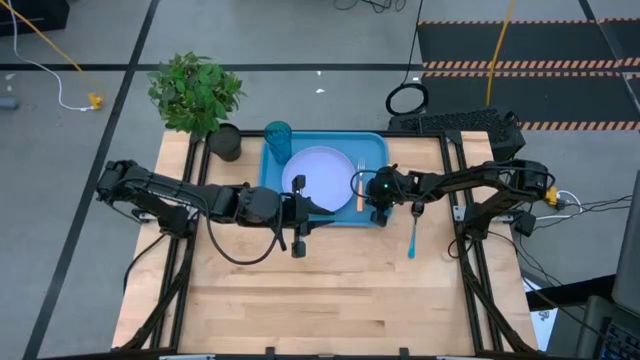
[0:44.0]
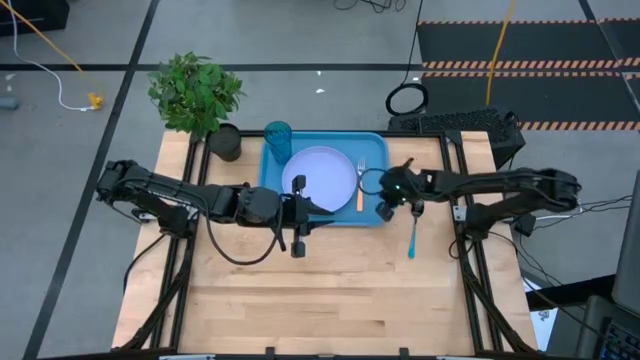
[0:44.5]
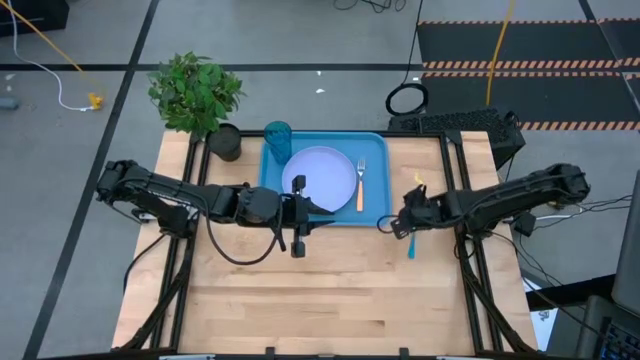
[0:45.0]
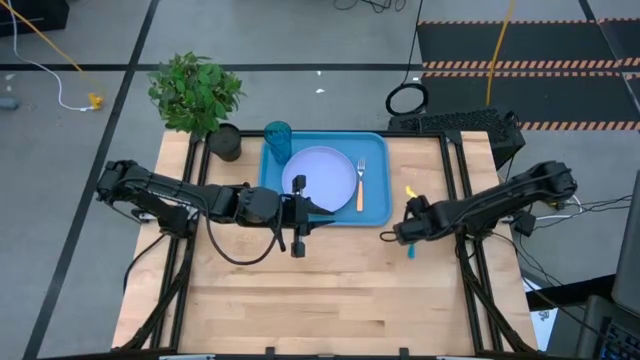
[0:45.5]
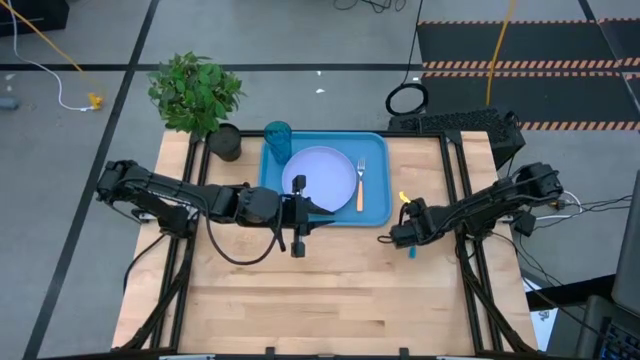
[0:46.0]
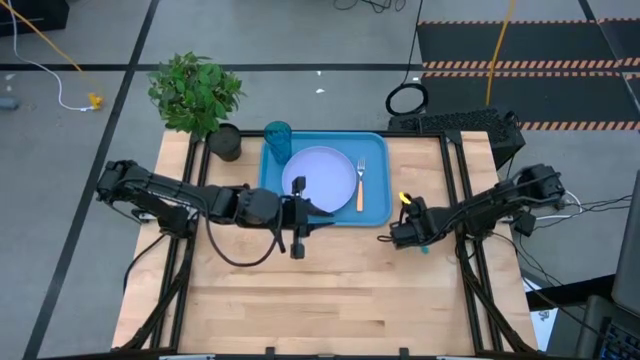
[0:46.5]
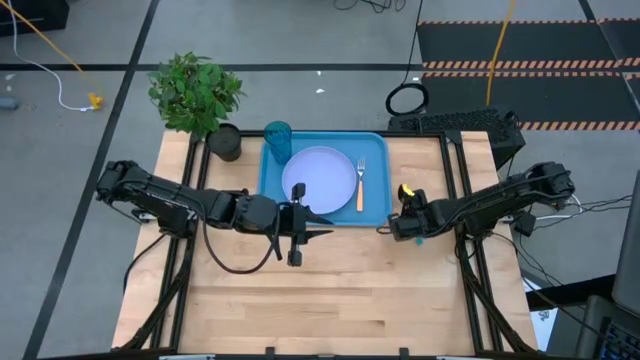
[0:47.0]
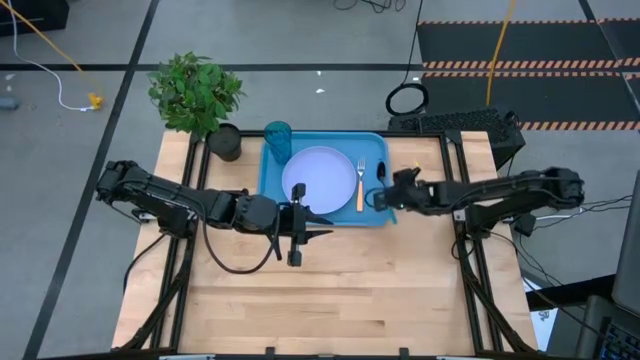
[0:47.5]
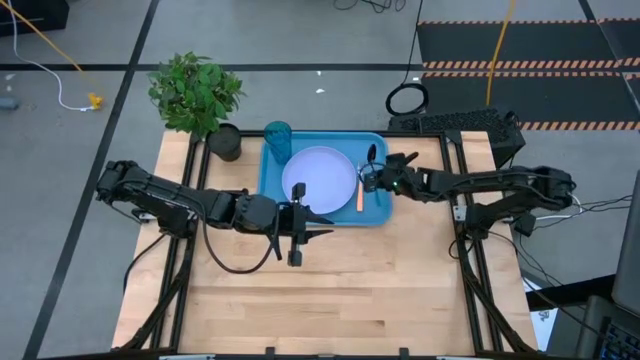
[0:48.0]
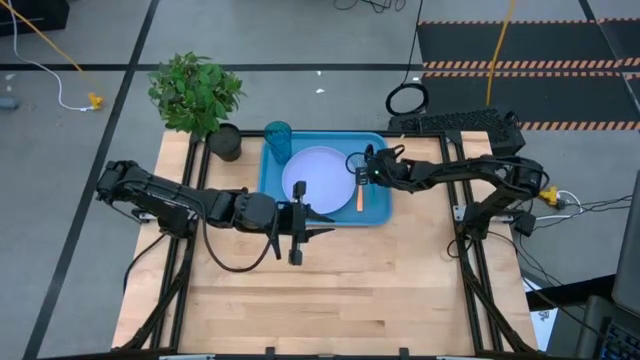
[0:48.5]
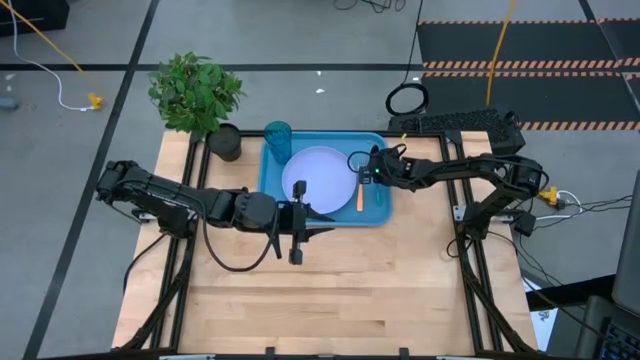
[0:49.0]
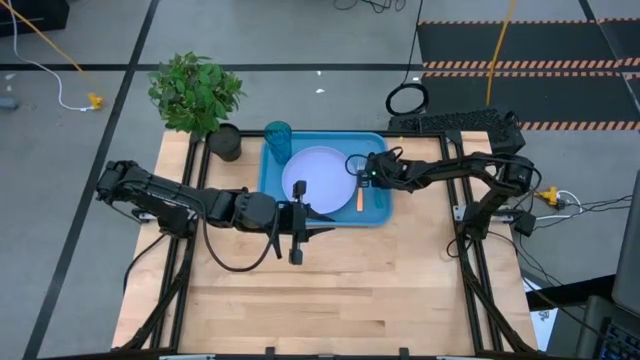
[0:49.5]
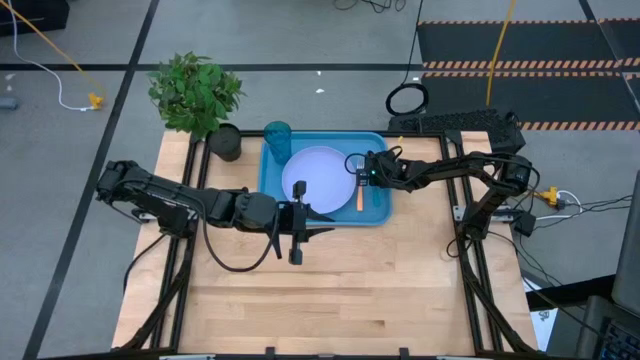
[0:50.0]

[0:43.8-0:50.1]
Task: Pick and place plate/cup/fork/spoon on tray
Put the spoon on the blue serving tray

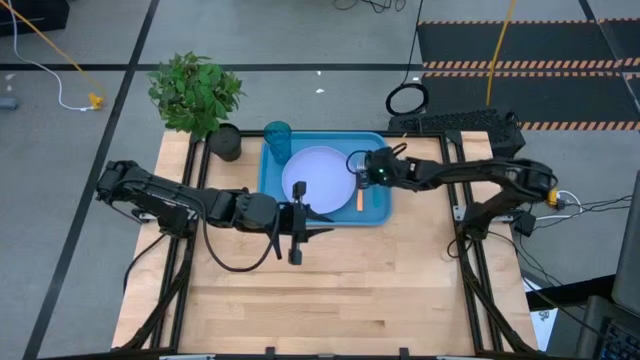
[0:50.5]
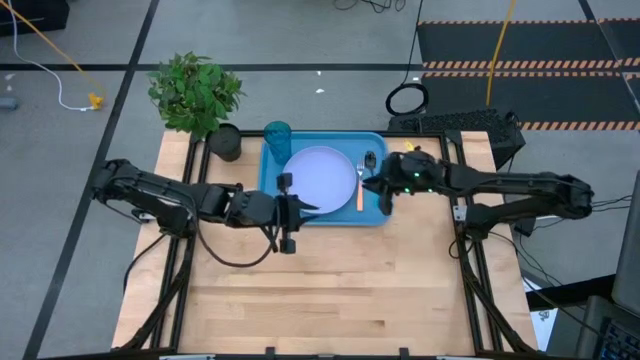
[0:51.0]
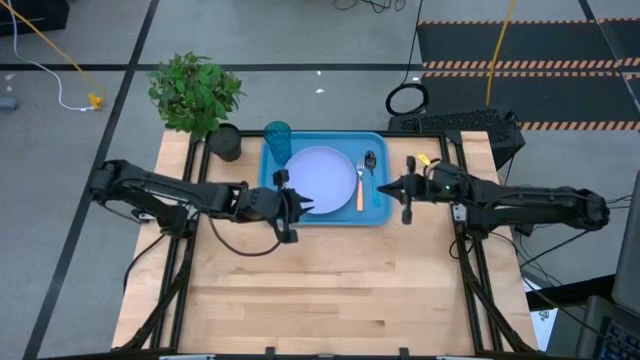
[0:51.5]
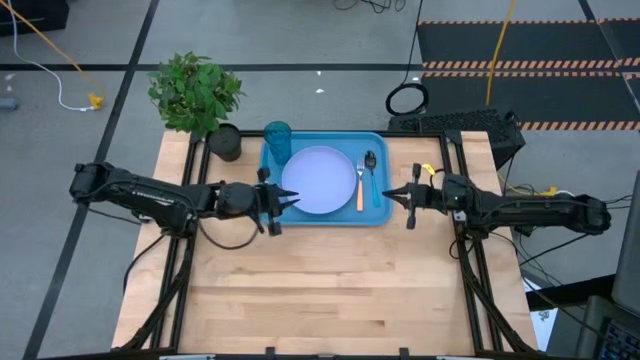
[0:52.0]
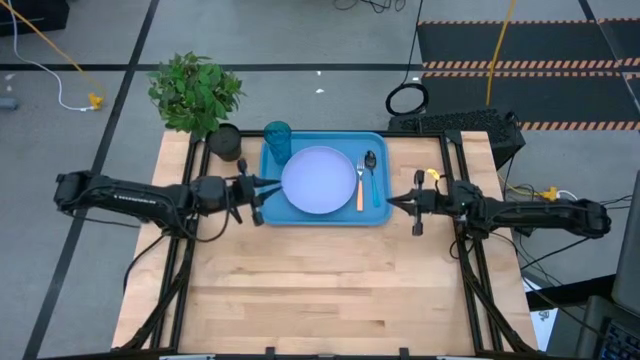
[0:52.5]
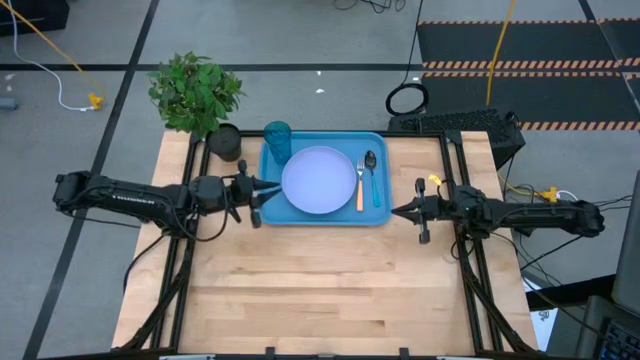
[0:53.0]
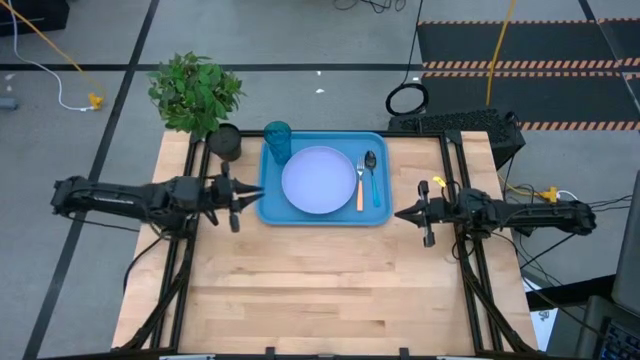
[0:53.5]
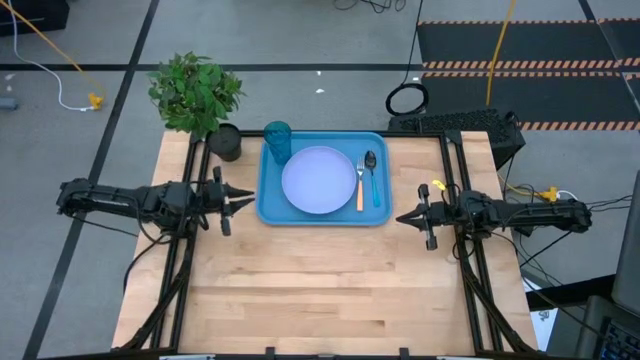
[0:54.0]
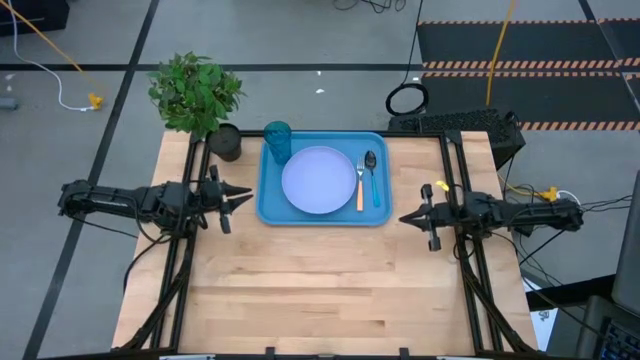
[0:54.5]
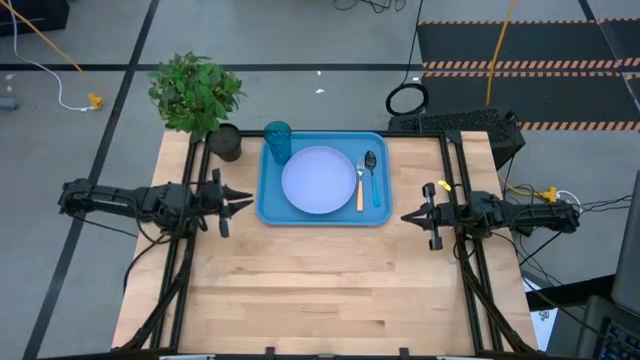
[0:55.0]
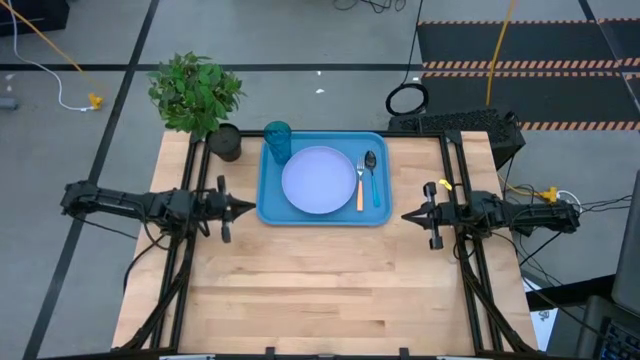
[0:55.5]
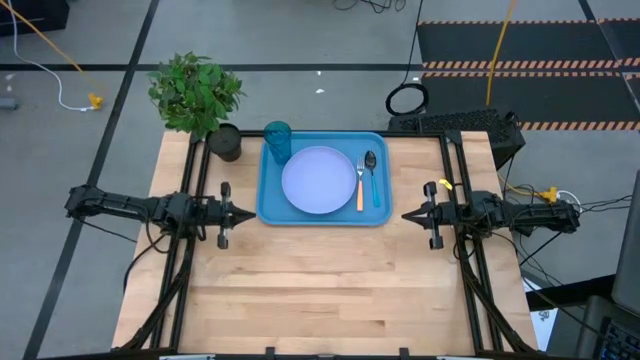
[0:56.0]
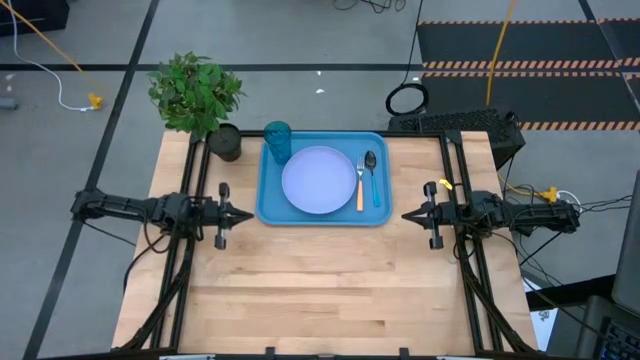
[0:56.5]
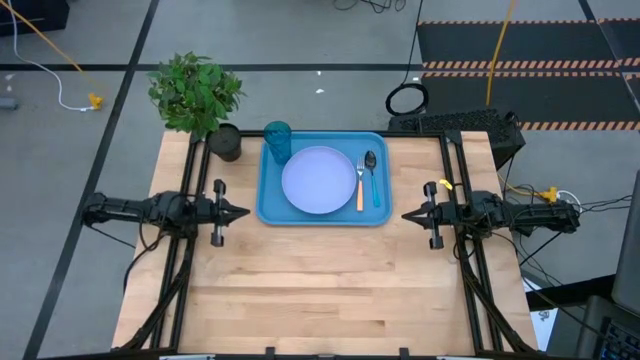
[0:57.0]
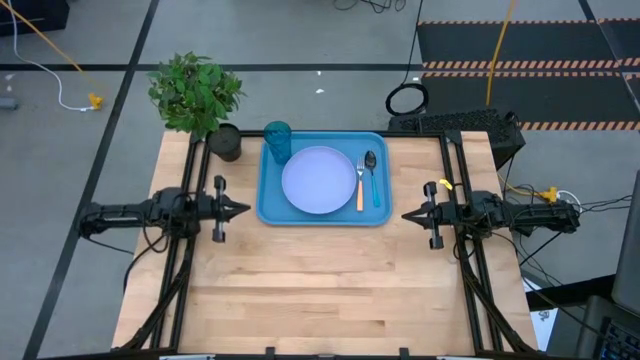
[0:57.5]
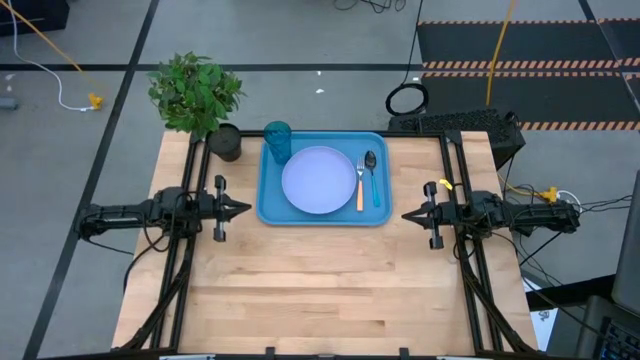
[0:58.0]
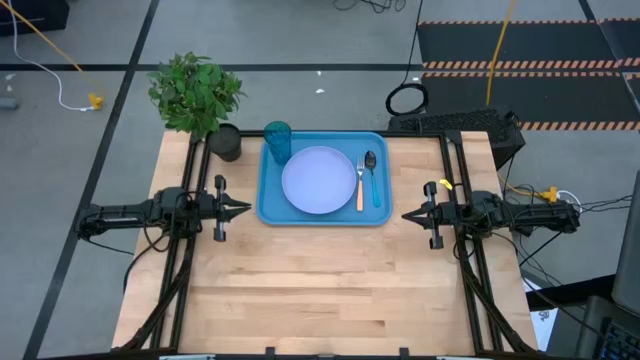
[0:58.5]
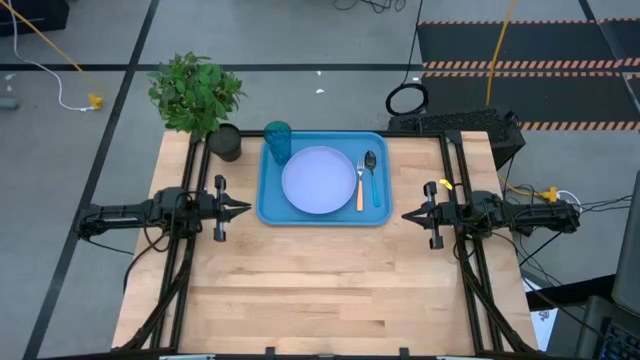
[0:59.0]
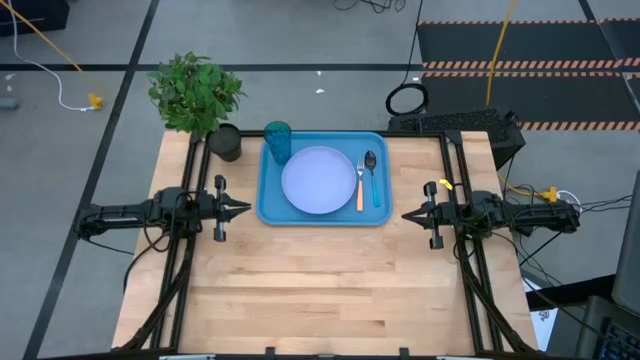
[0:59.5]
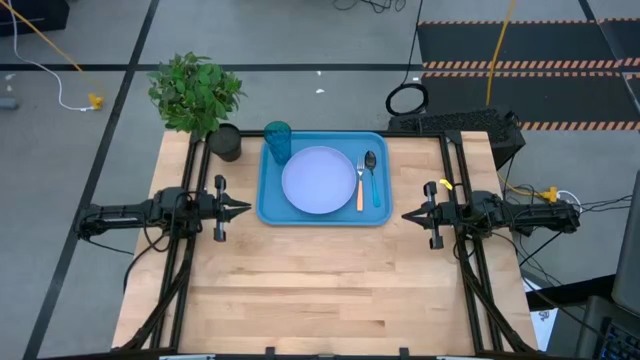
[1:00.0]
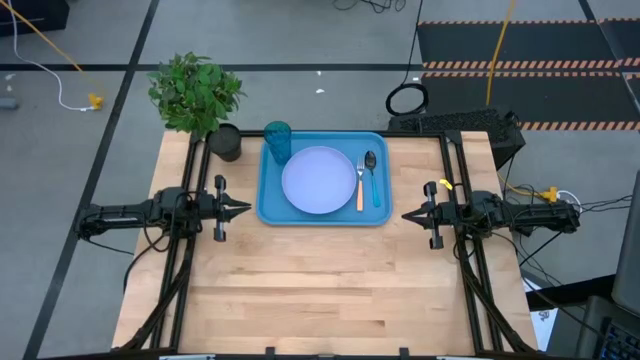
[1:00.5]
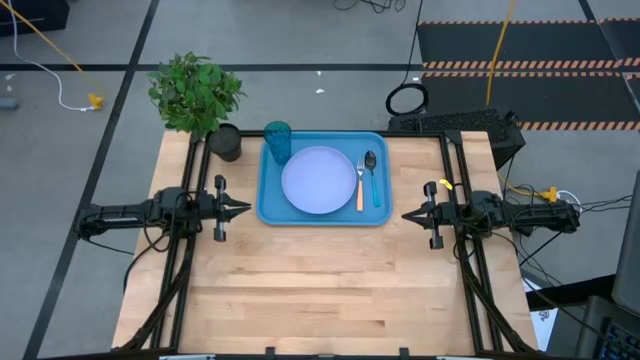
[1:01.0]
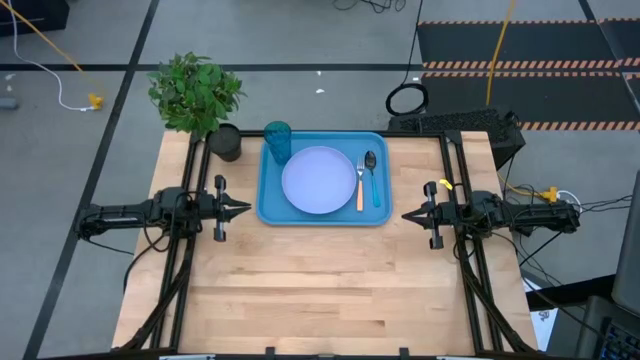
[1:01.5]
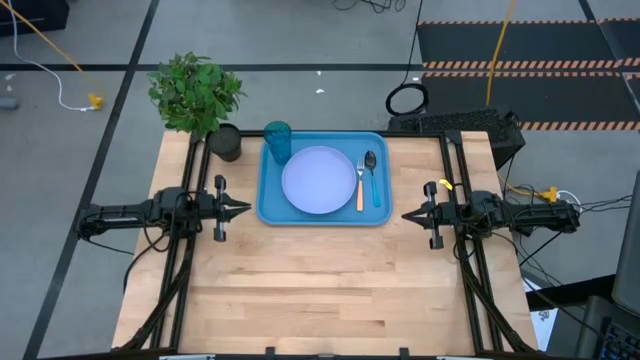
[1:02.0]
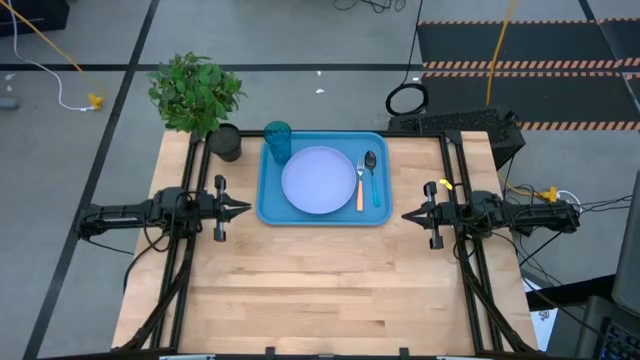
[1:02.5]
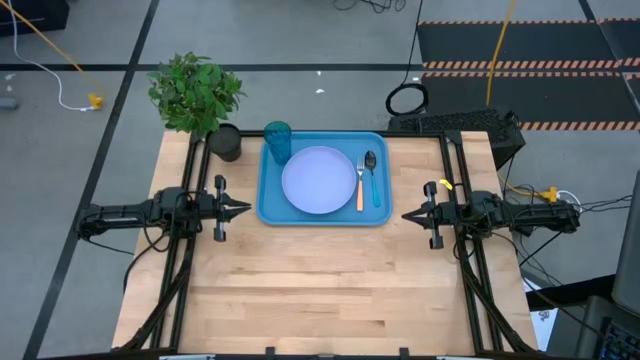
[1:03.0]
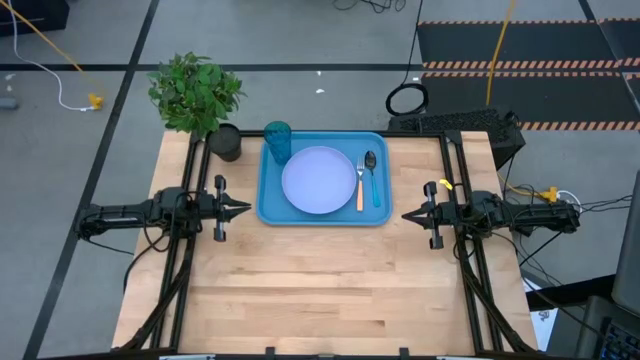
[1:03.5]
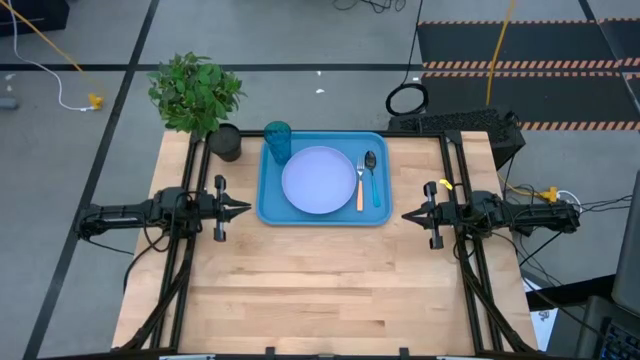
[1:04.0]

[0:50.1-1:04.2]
Return to Home Position
